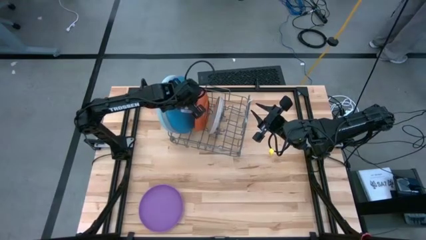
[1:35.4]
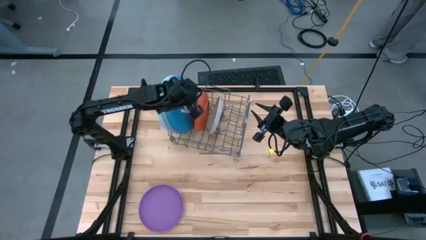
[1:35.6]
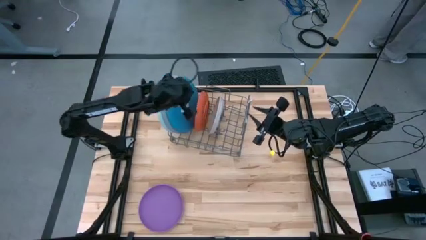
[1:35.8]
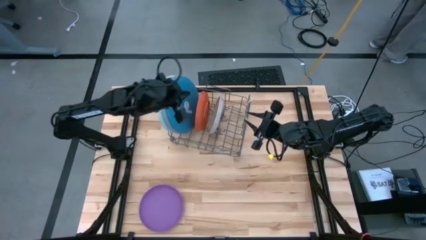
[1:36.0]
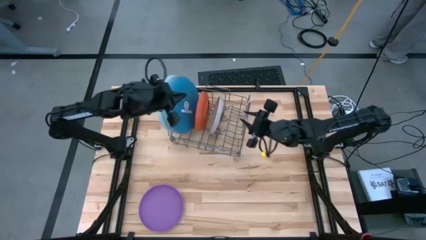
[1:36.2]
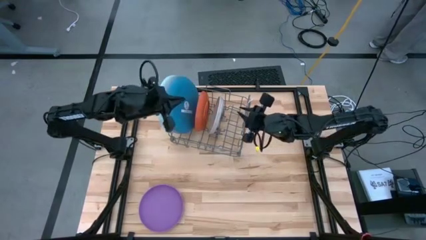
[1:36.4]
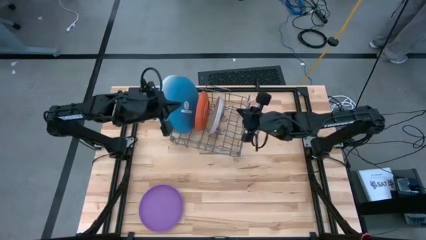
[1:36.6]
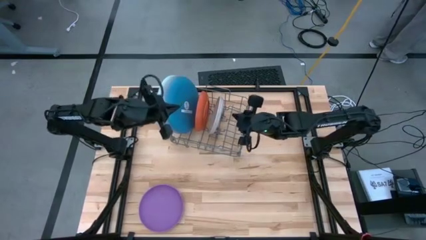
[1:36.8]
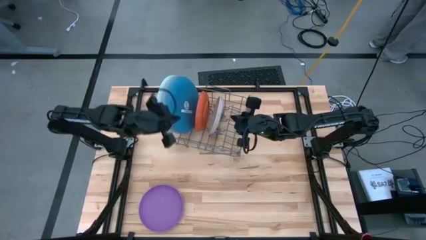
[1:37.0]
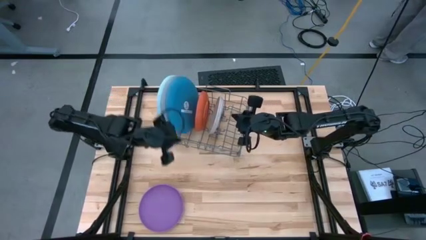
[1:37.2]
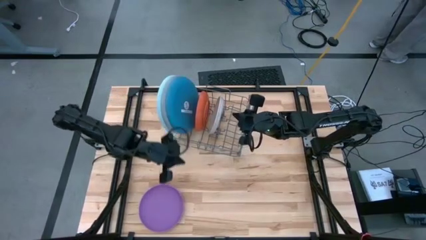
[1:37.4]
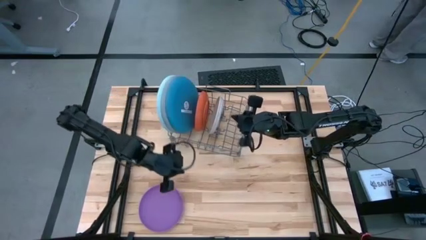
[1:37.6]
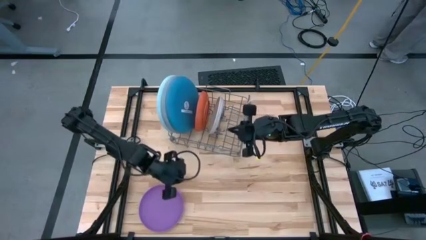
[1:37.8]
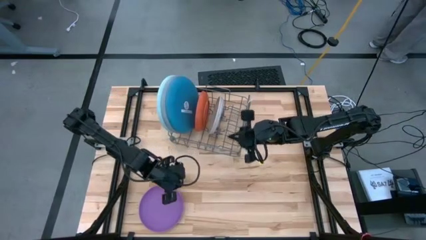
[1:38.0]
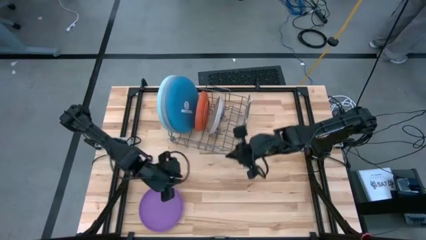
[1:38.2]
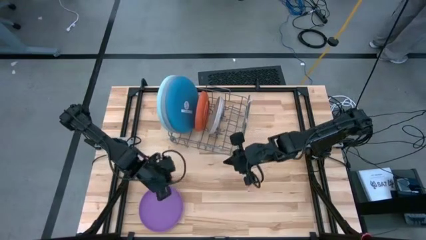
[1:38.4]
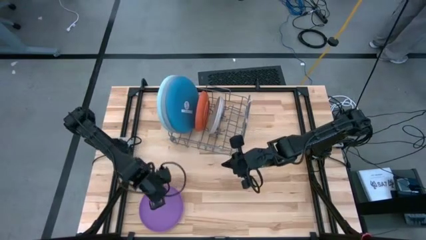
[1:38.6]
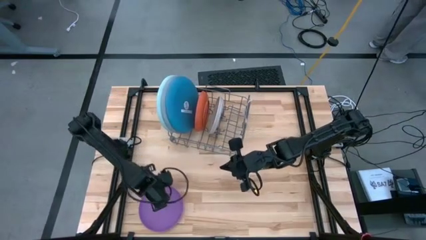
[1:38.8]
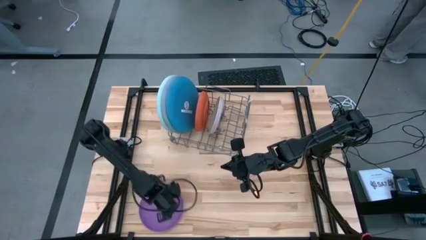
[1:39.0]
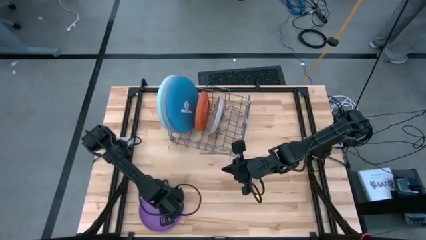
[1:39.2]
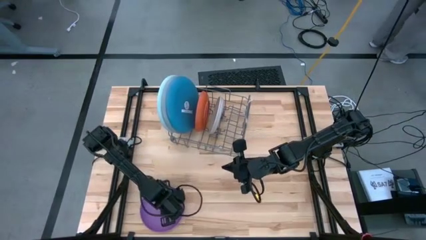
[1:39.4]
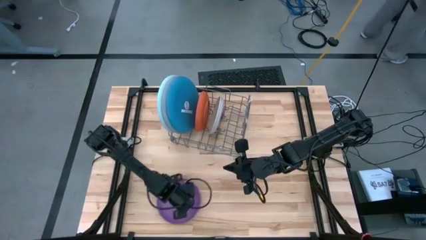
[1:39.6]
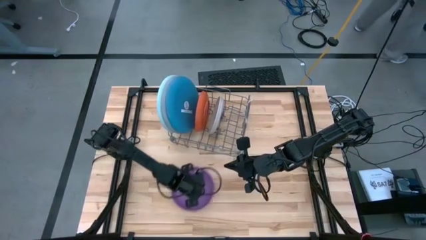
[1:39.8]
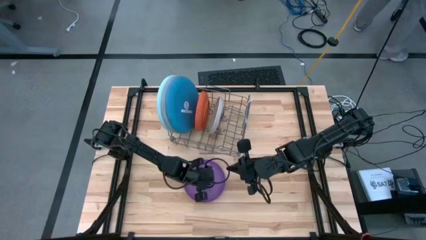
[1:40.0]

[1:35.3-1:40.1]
Task: Sort dishes
Move the violet plate to the middle table

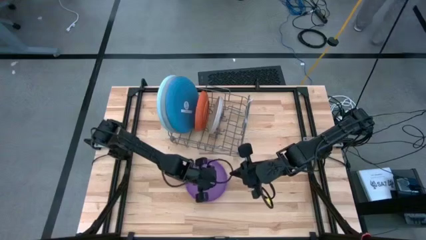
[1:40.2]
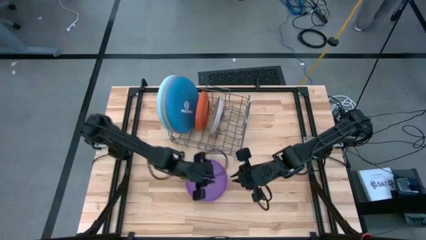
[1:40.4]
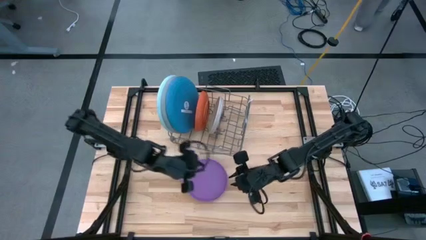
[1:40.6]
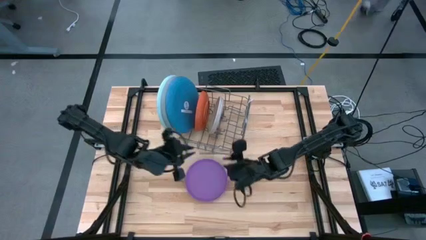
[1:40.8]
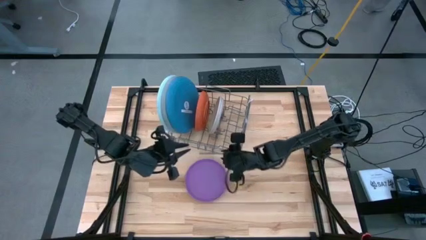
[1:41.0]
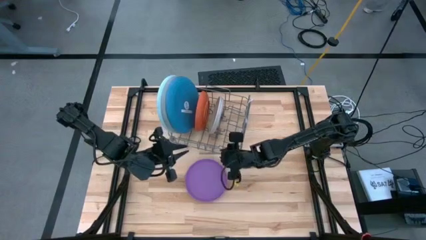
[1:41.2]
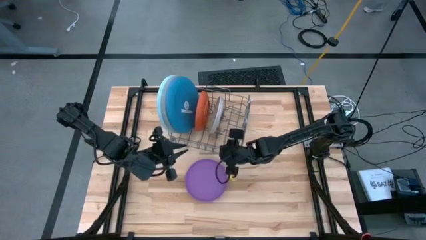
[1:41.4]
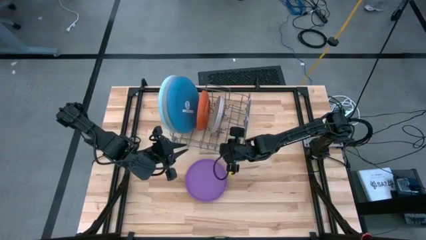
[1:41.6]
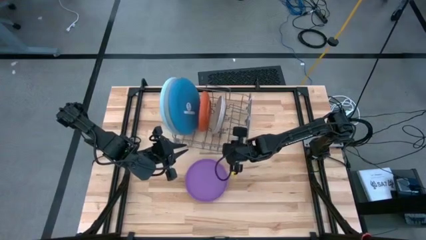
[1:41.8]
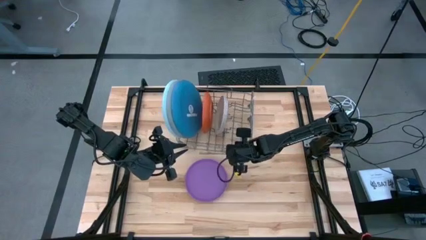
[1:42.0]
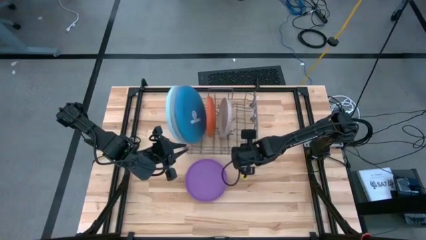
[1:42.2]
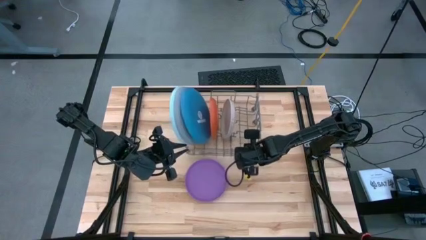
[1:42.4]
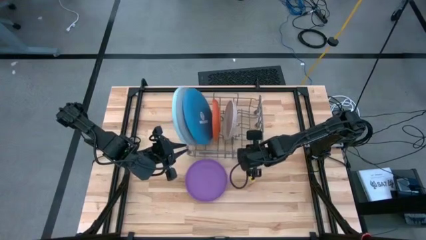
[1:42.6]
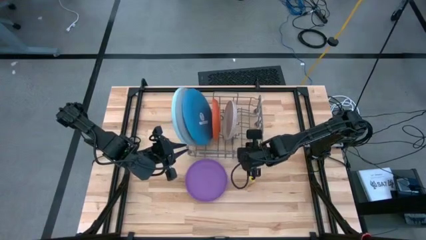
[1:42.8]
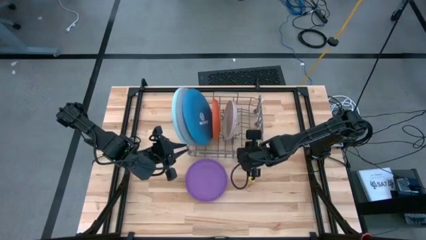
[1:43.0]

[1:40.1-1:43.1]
Adjust the dish rack

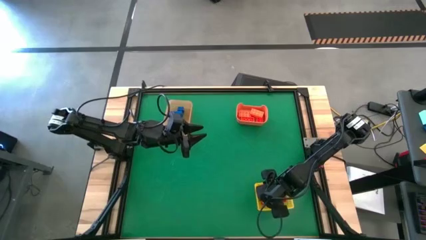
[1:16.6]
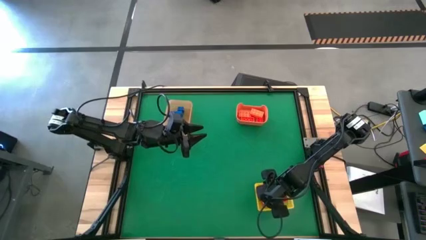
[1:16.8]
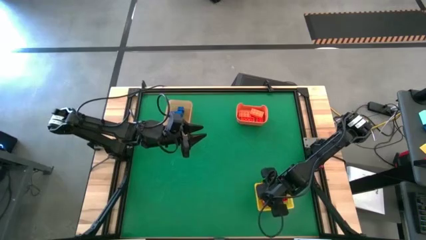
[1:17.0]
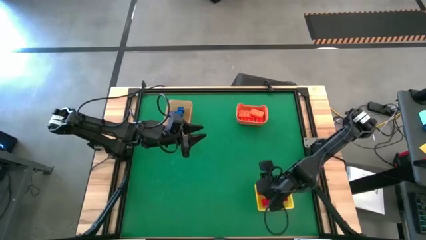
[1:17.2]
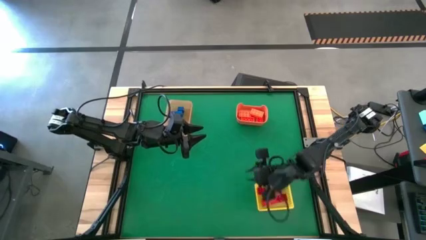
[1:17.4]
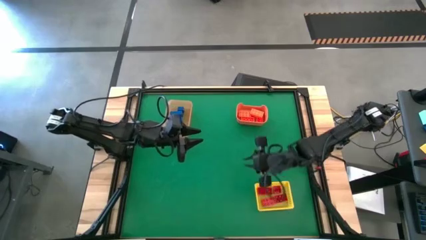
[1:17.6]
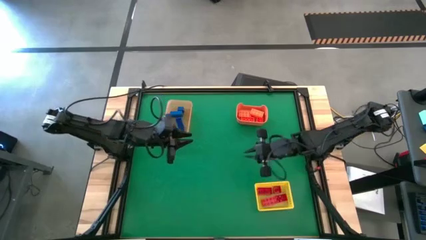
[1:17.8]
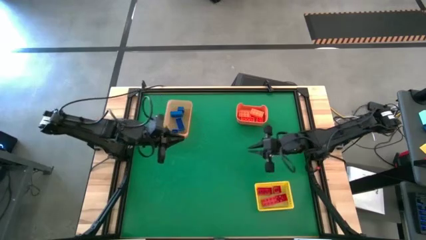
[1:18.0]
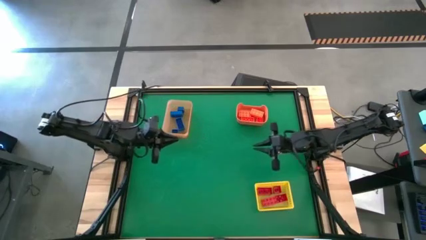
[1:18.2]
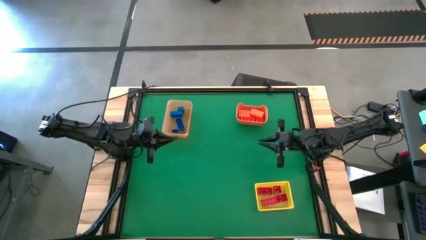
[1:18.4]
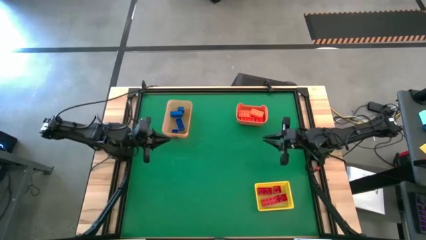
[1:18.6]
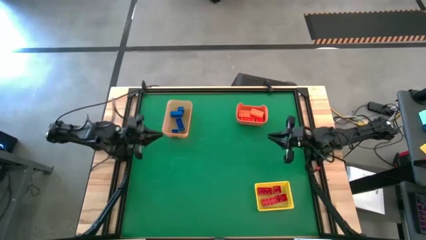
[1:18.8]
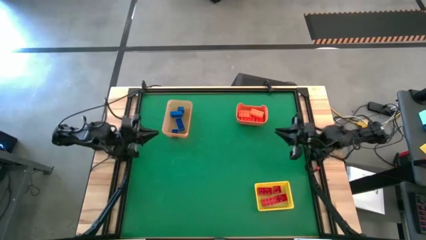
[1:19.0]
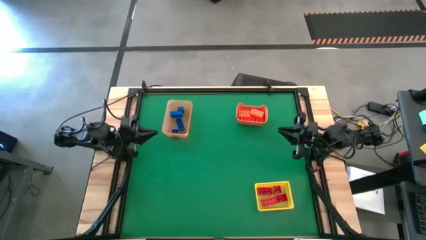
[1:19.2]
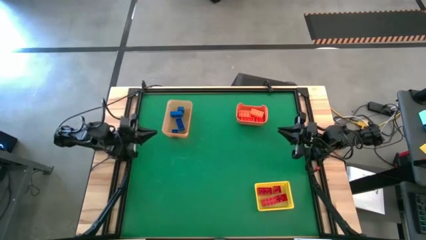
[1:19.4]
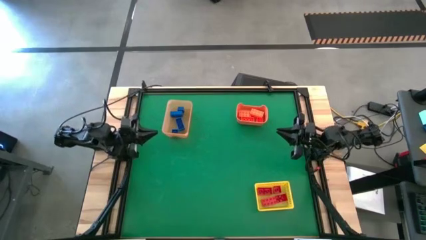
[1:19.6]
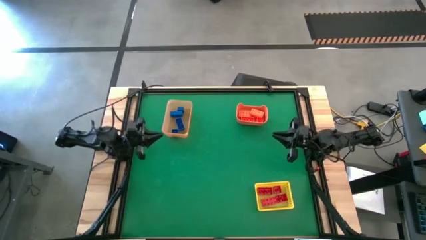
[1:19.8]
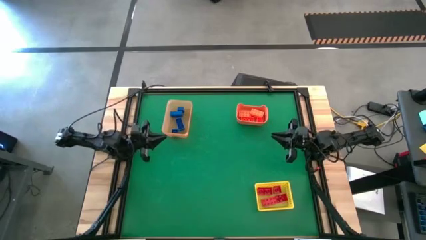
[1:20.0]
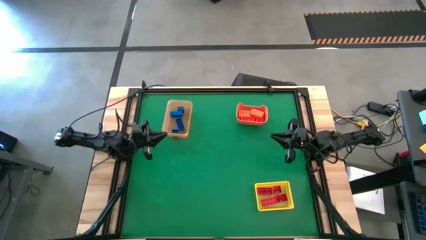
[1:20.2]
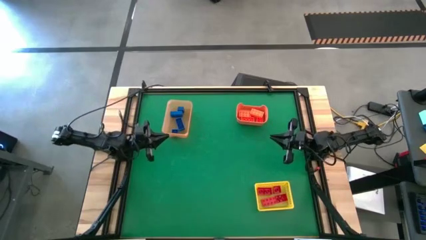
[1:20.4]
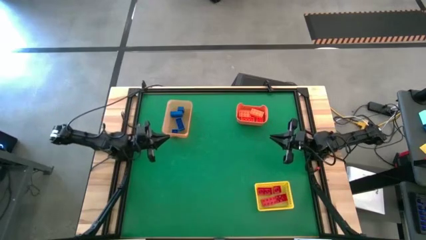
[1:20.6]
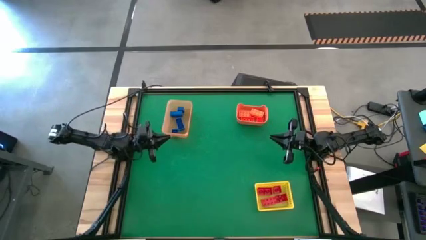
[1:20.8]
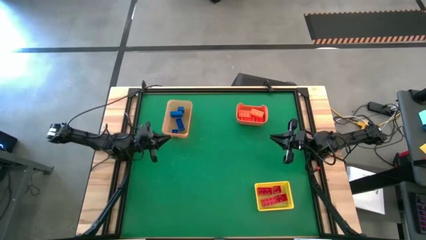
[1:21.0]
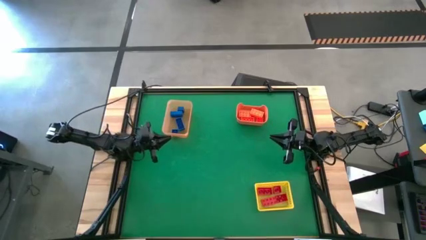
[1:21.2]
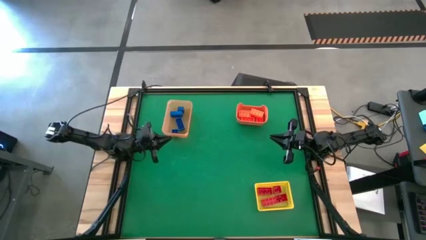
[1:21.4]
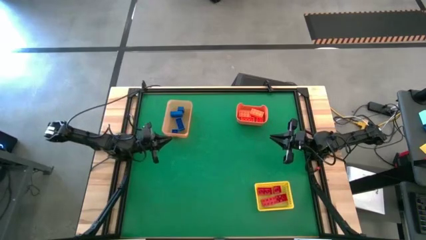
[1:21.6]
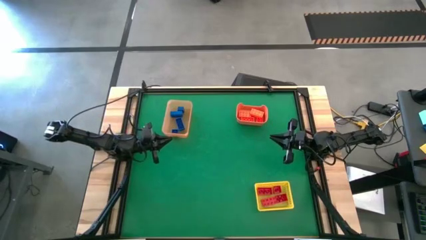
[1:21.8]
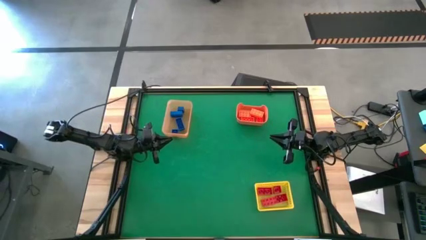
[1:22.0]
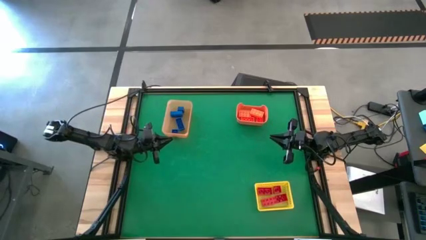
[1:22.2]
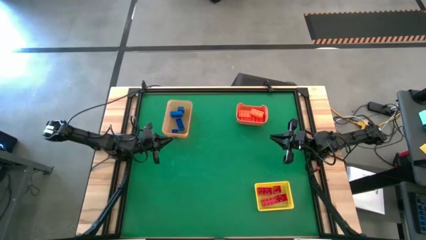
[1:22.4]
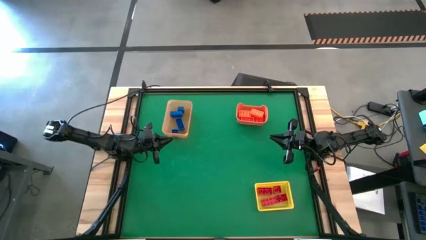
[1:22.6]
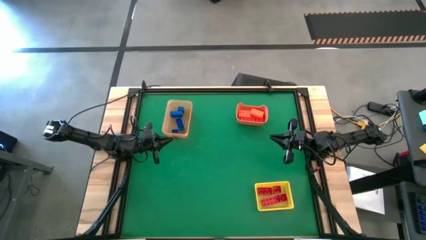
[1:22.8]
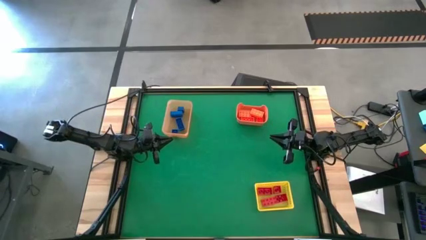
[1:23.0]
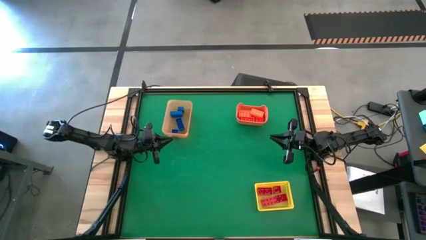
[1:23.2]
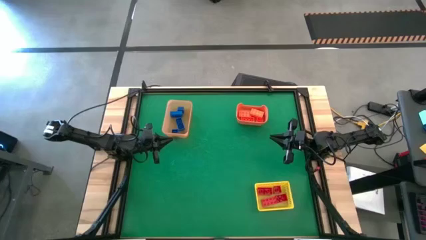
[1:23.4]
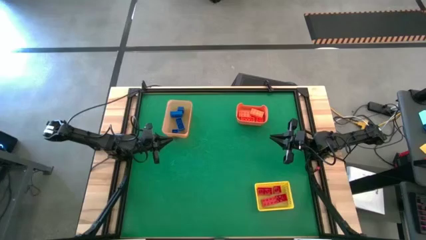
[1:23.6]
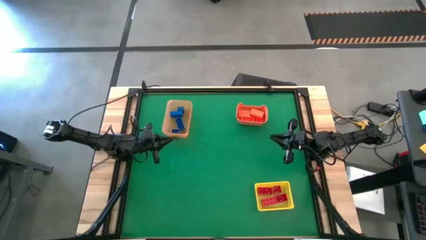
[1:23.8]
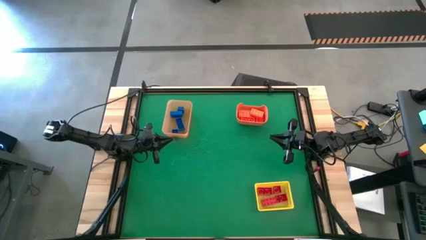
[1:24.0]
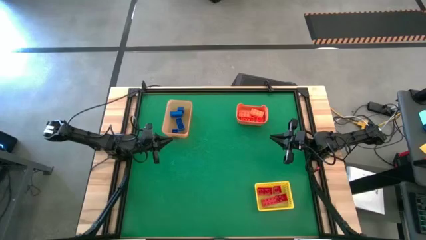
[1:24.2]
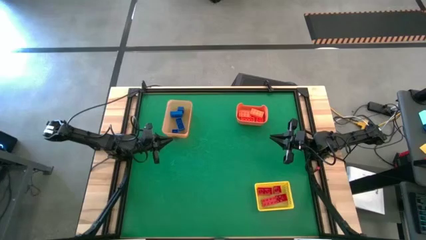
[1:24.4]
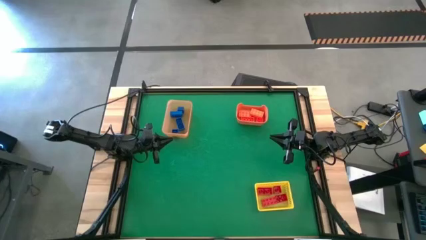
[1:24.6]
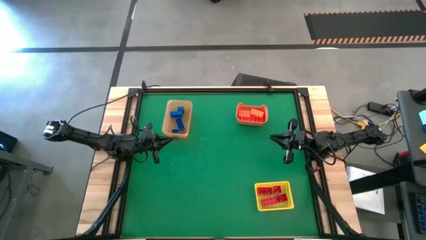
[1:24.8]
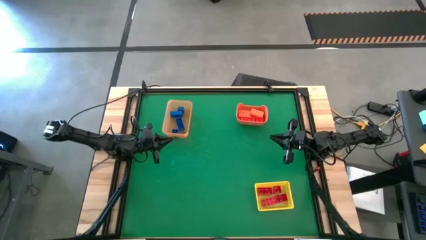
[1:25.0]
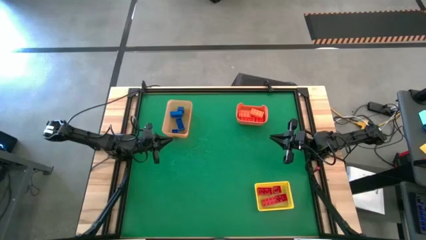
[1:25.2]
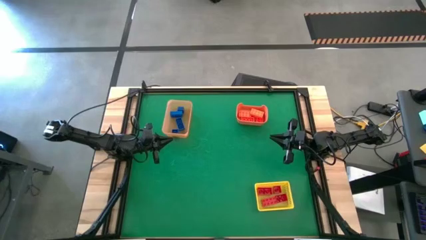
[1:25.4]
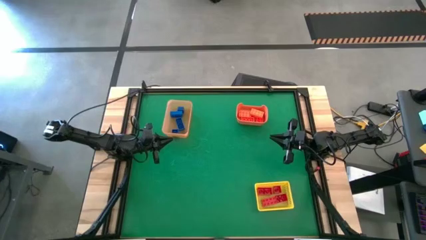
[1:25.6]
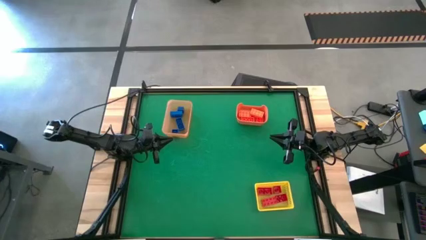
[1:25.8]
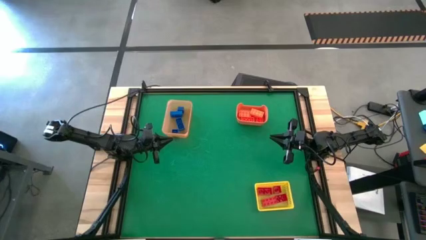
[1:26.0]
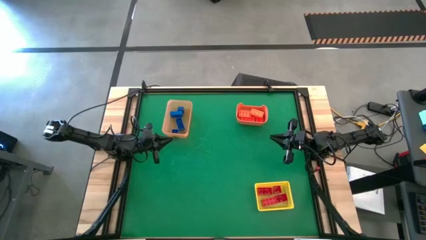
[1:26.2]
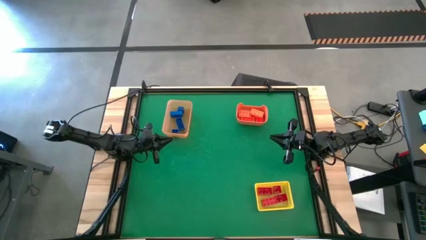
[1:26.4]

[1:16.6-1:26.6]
Task: Sort & place blocks by color
Return to Home Position
